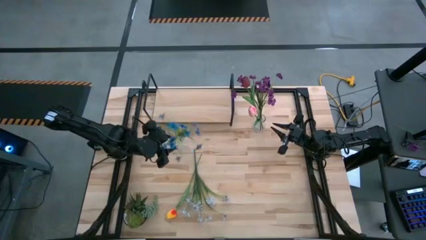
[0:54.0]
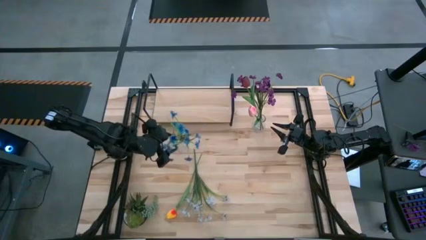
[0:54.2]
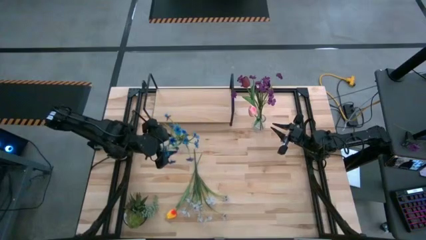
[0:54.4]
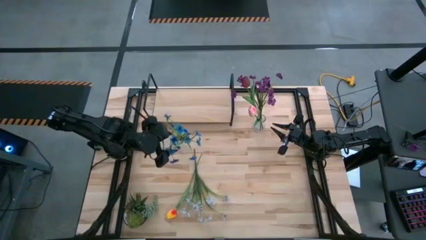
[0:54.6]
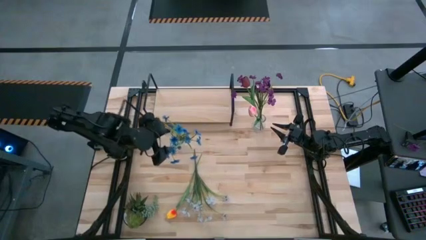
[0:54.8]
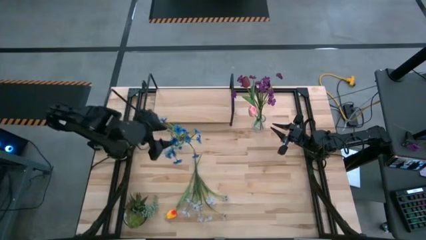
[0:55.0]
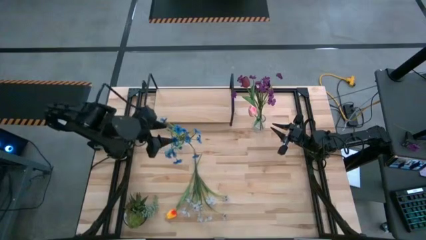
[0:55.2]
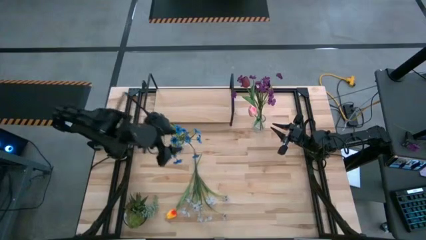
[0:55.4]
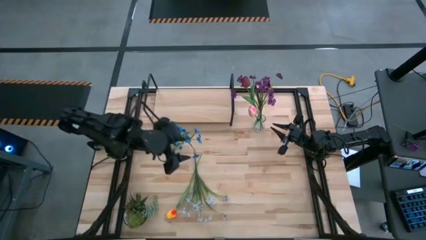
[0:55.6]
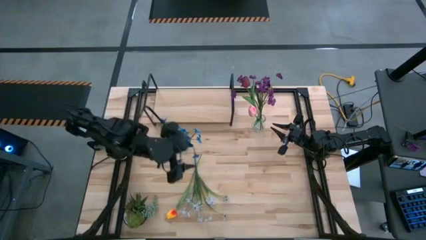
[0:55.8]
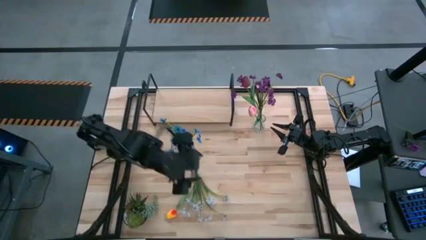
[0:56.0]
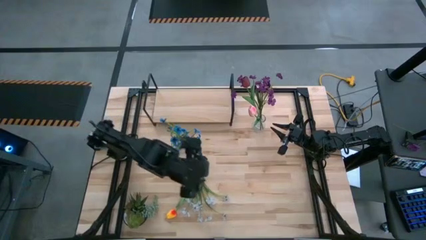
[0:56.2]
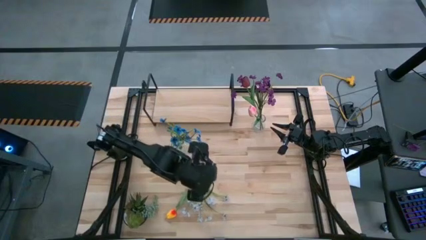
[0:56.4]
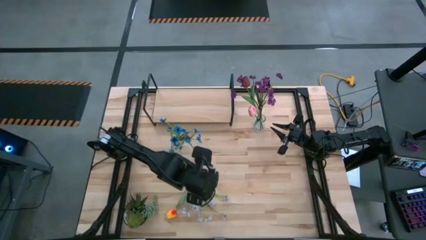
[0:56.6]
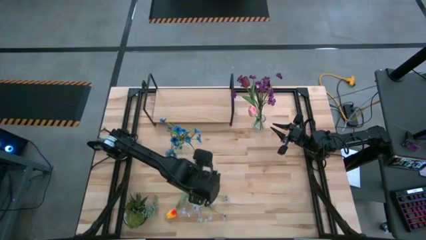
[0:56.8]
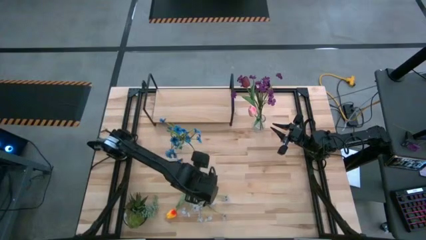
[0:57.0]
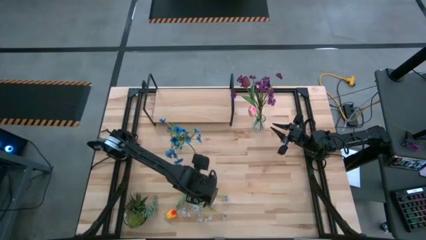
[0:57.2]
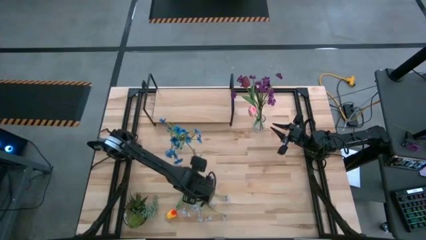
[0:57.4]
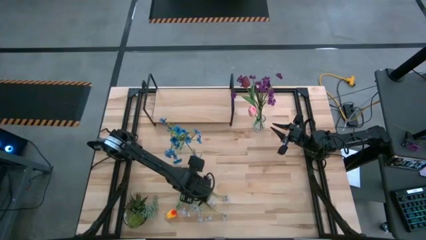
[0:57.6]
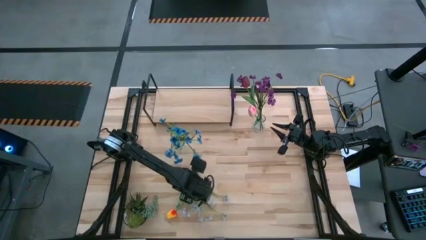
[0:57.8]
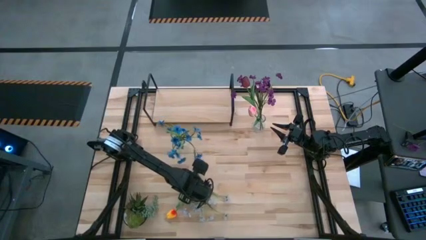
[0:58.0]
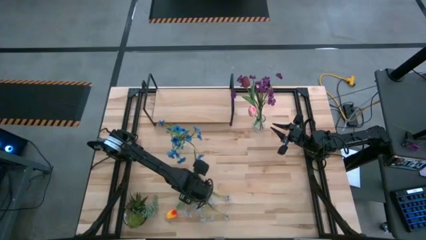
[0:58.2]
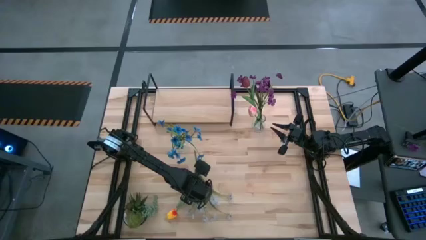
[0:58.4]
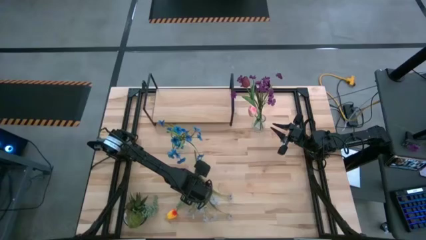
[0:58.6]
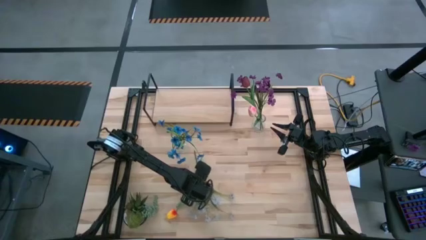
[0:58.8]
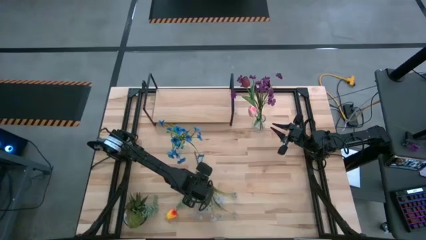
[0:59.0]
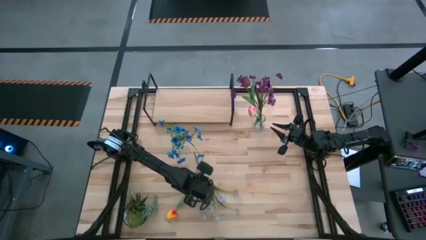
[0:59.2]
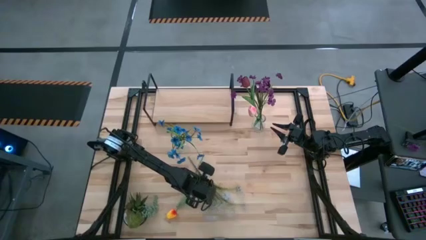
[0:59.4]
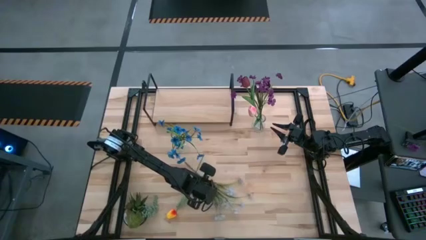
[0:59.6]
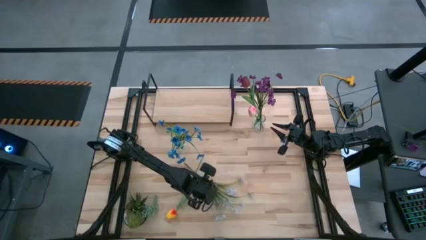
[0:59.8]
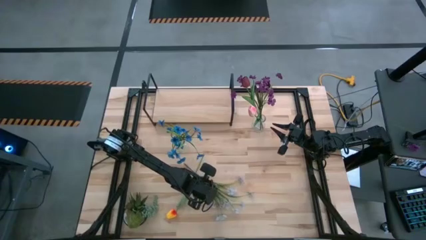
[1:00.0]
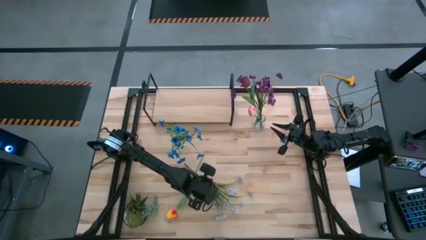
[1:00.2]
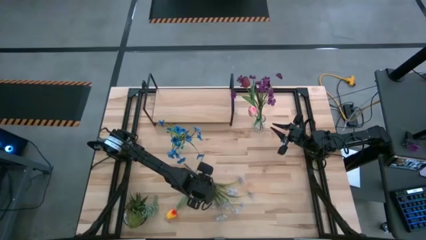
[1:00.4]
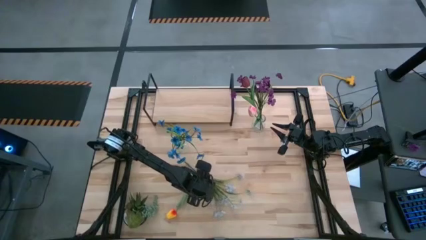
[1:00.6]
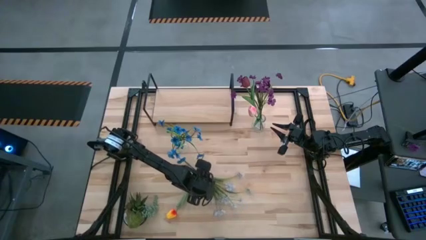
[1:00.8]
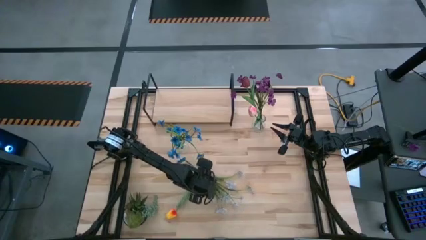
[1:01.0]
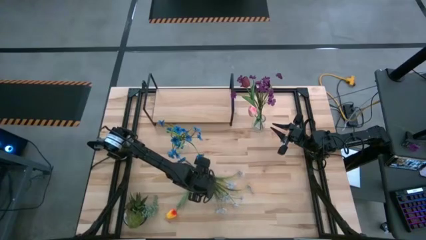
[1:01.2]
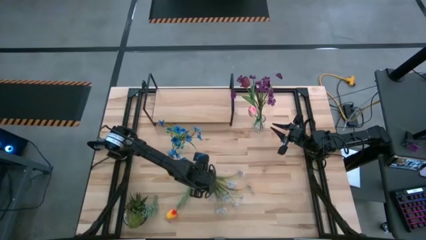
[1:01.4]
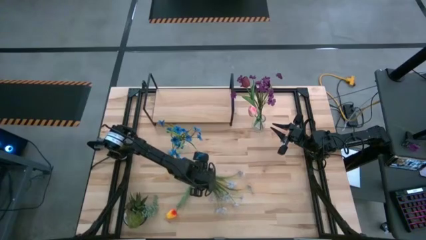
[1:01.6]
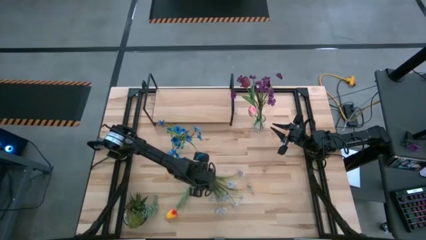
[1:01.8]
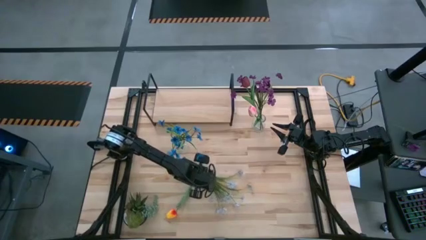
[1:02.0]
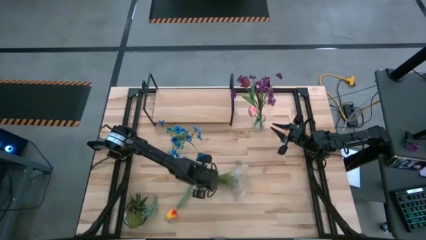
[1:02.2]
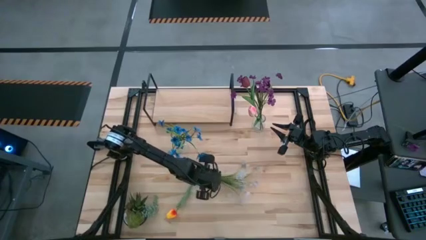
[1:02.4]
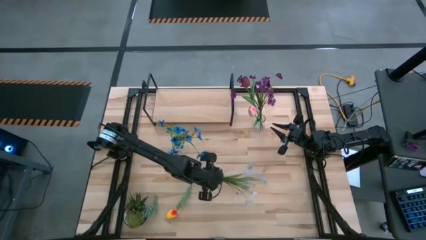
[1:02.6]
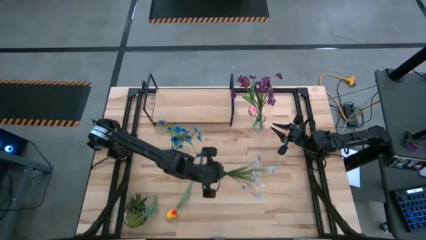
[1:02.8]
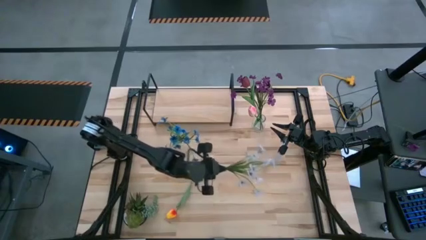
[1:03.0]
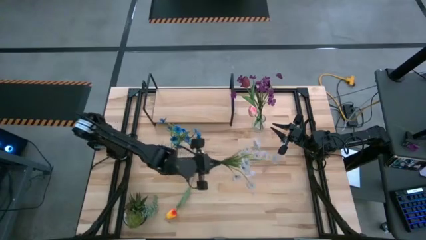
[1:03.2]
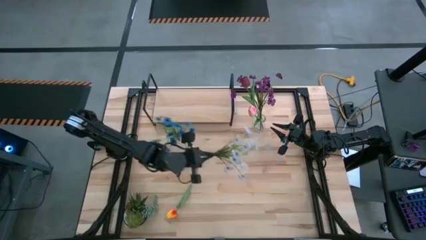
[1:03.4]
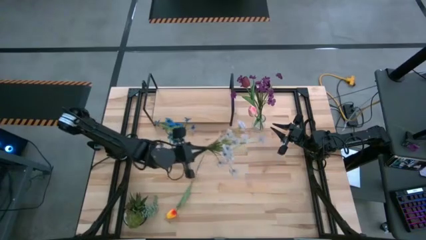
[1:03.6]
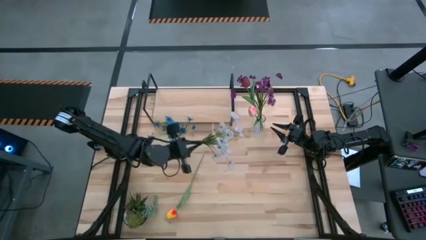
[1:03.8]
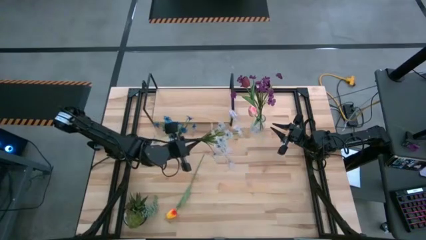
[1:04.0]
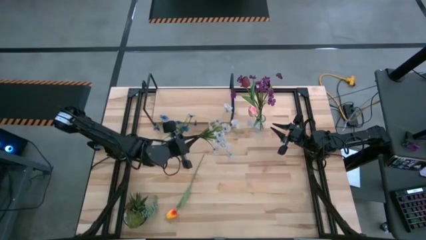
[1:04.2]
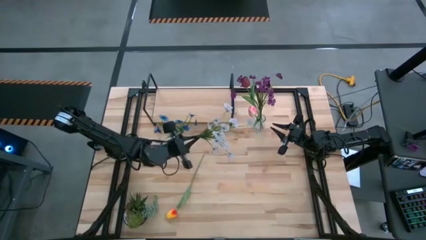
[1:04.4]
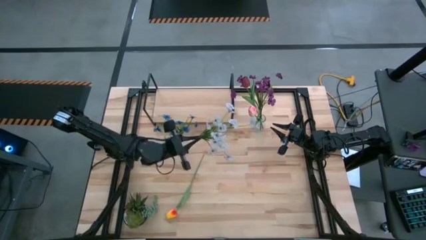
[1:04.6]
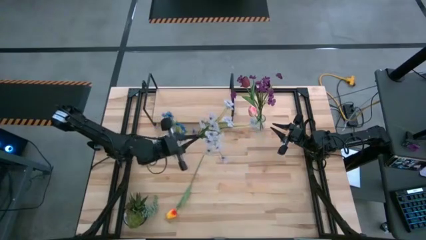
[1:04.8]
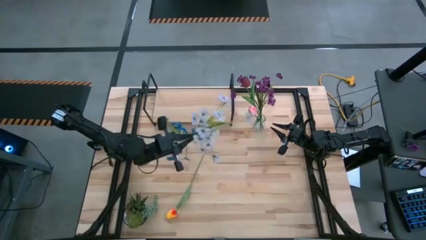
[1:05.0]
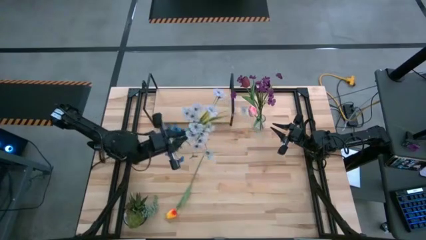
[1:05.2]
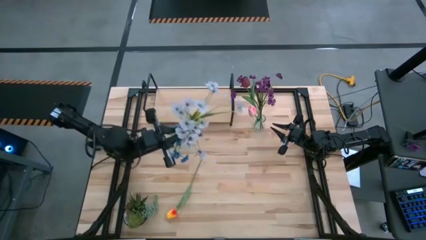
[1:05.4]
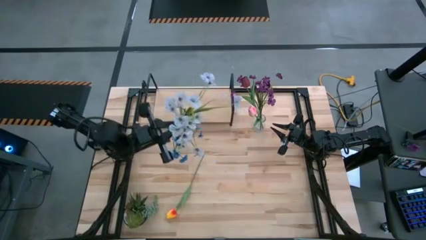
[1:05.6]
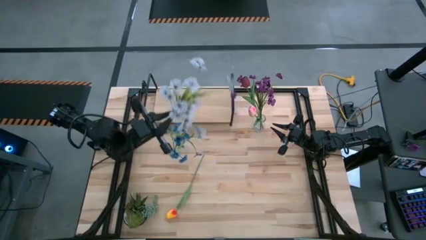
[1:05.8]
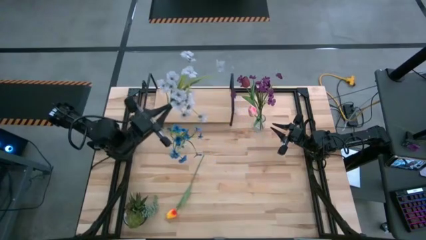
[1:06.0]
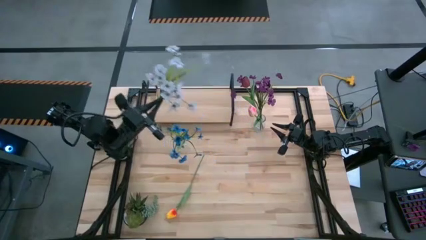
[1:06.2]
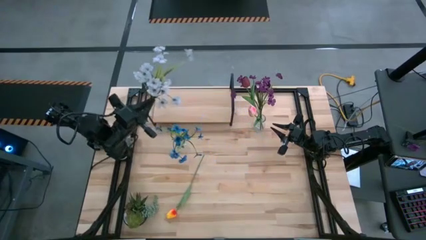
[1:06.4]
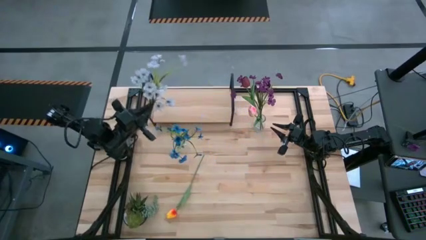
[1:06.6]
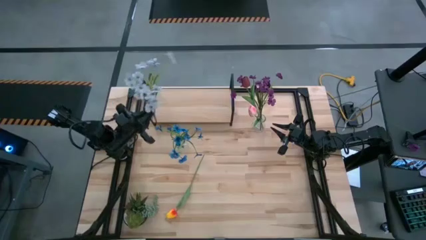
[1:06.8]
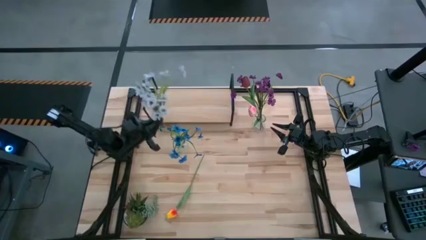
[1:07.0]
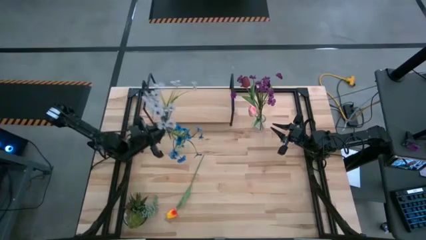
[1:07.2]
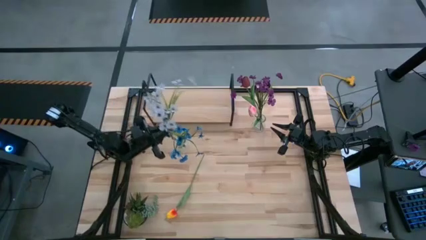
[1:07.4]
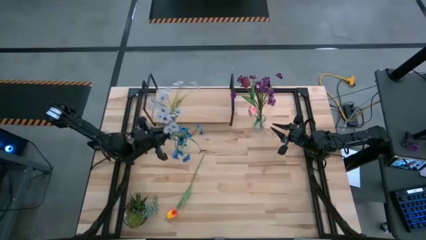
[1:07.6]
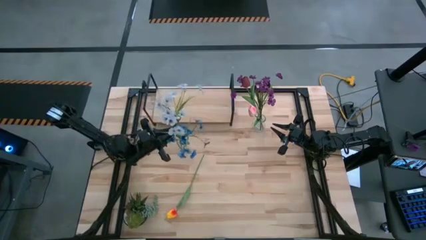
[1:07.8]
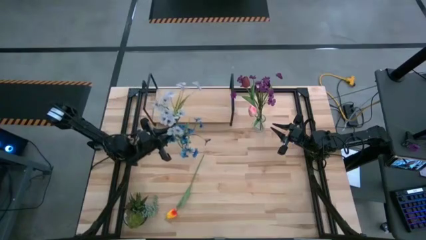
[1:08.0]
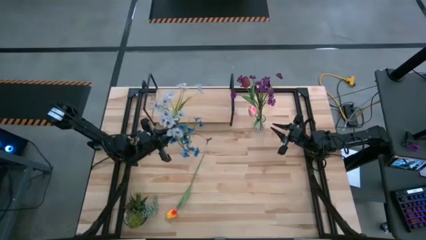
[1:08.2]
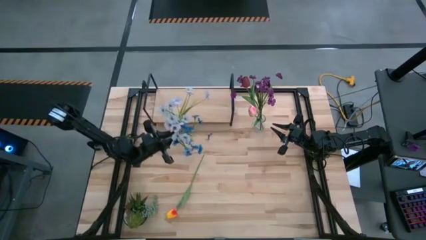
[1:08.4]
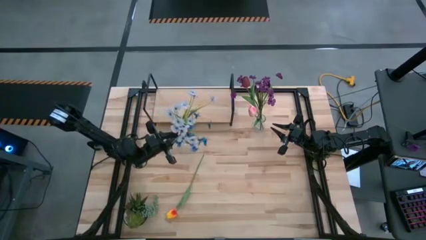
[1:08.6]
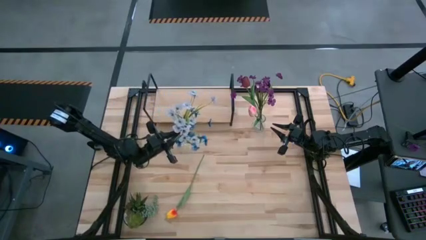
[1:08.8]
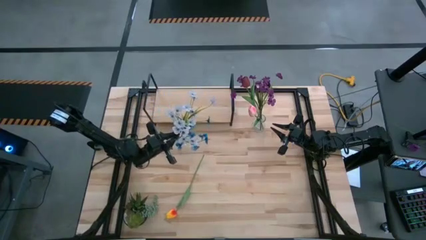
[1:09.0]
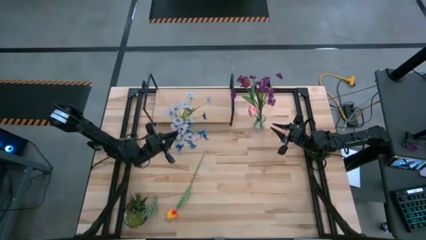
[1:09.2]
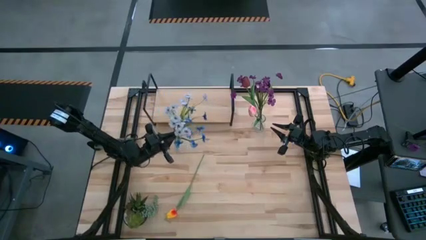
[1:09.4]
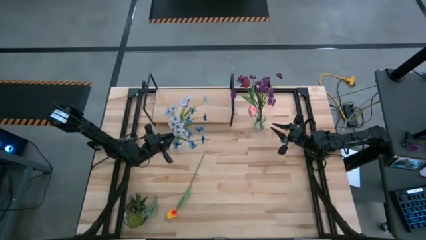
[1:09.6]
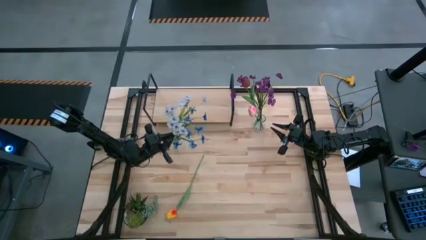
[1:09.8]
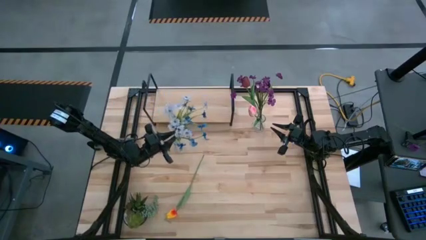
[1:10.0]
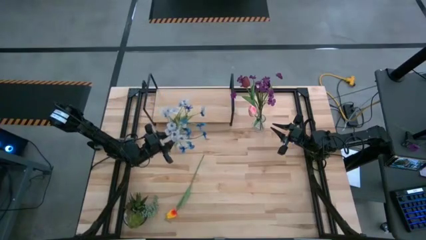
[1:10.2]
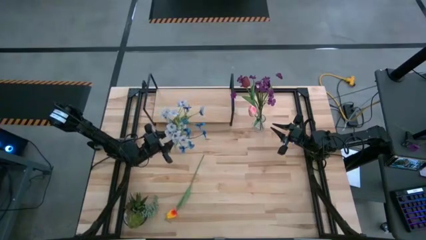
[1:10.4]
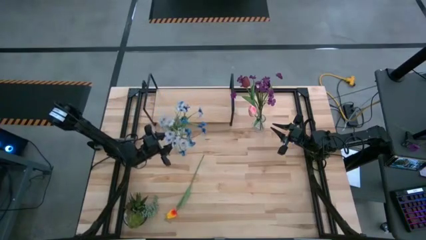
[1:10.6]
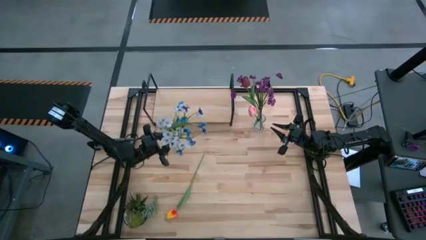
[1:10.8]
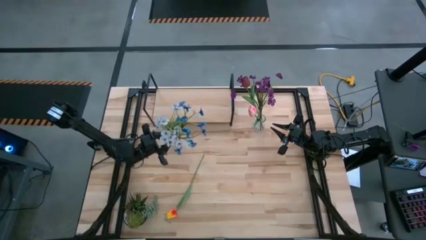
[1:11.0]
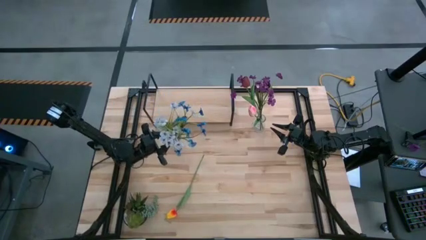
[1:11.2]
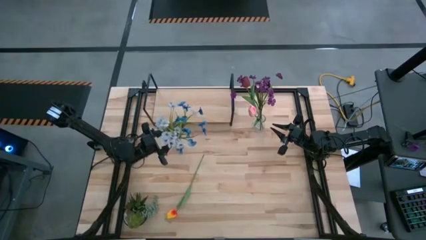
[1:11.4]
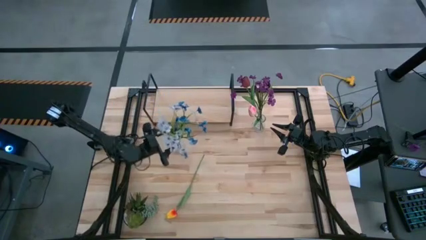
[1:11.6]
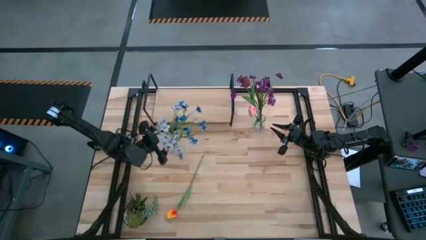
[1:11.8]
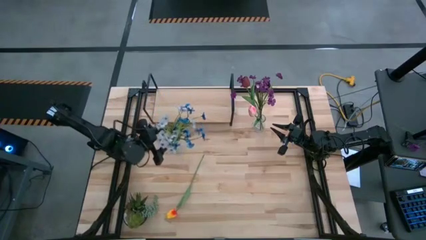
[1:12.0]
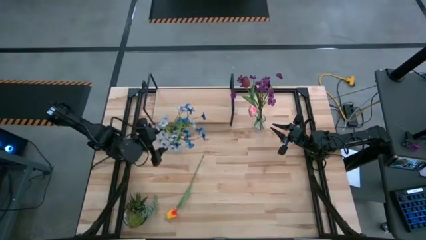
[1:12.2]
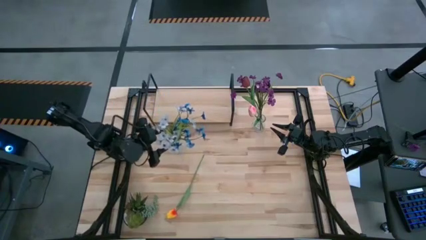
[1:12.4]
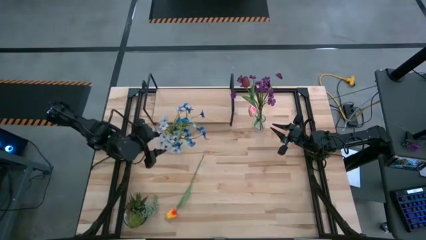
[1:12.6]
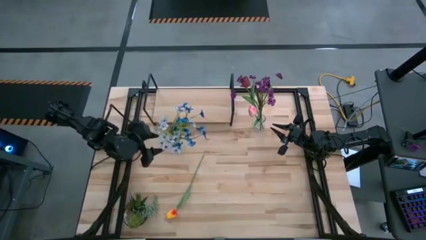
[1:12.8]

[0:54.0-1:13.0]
Task: Pick and place flowers into a vace then onto a shelf
Put the white flowers into the left transparent vase
